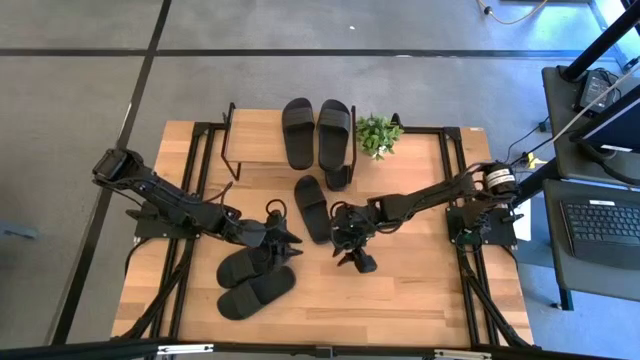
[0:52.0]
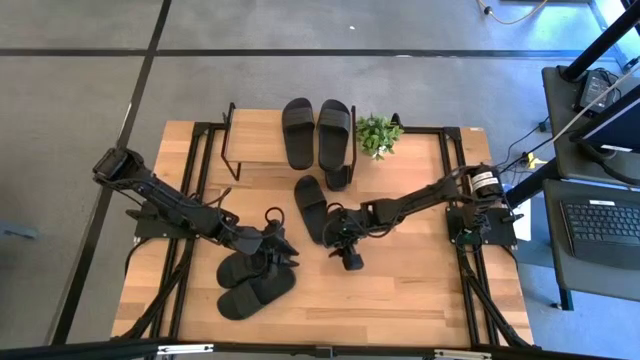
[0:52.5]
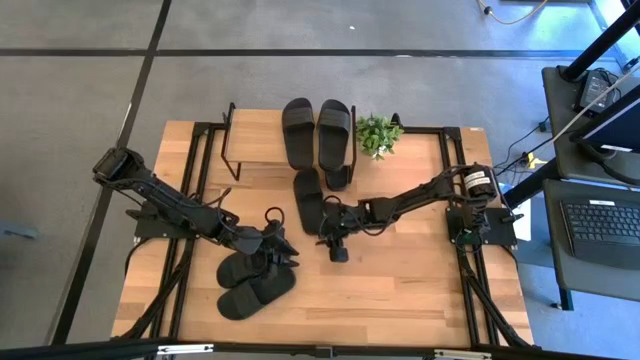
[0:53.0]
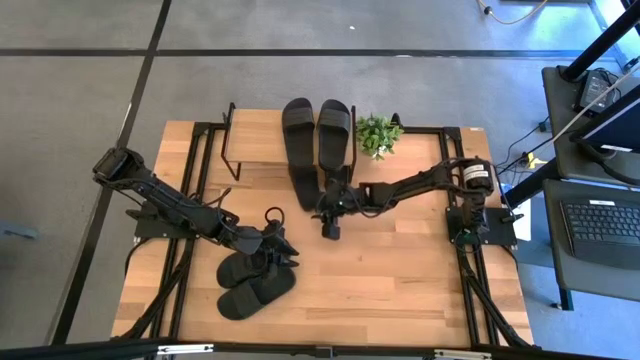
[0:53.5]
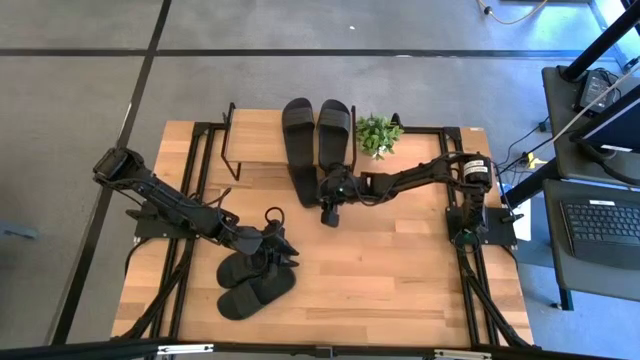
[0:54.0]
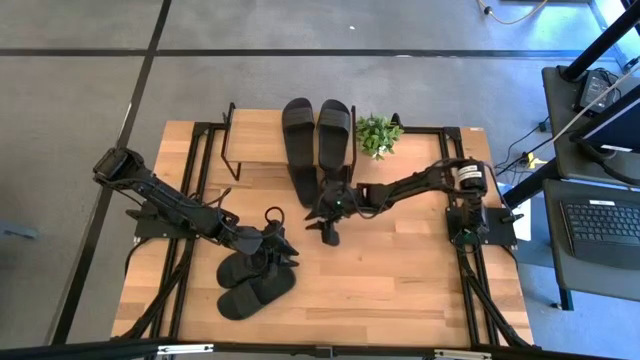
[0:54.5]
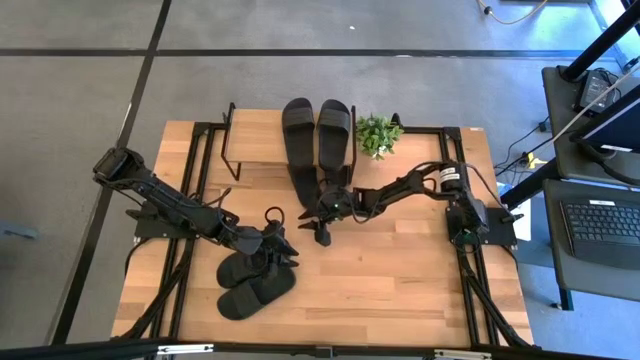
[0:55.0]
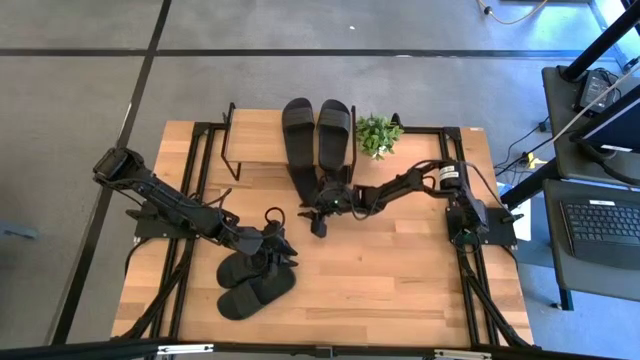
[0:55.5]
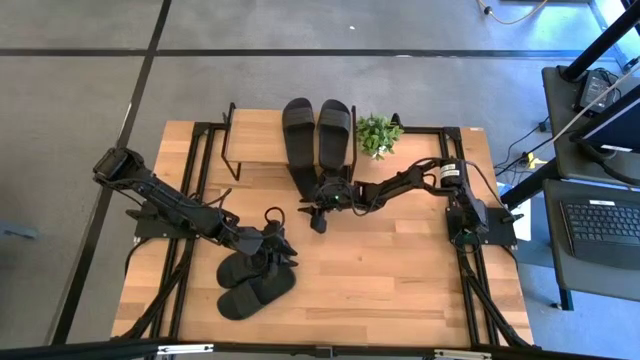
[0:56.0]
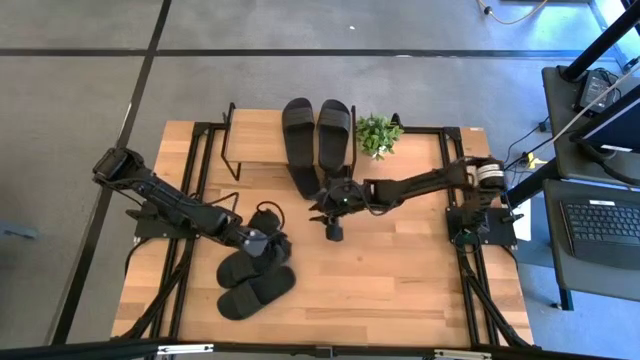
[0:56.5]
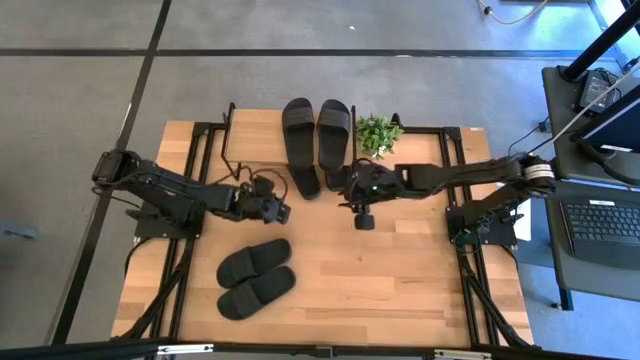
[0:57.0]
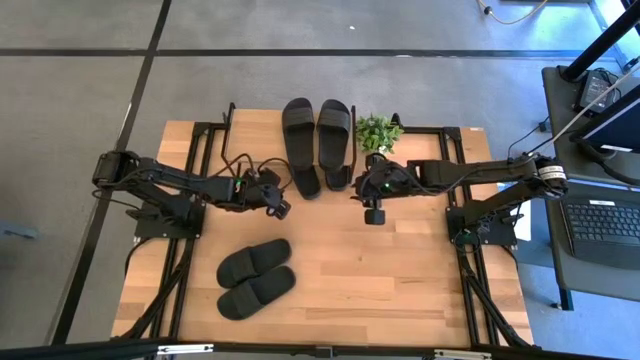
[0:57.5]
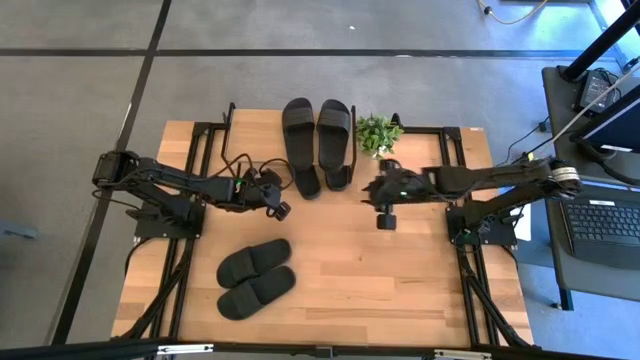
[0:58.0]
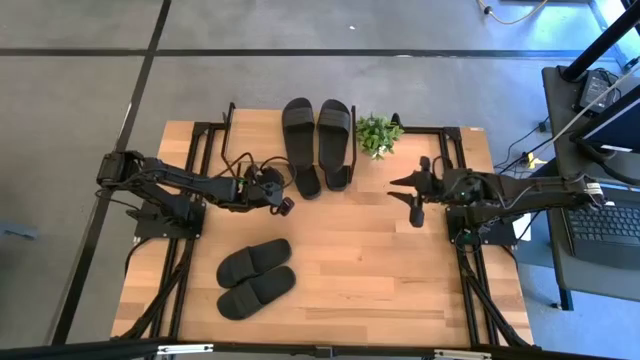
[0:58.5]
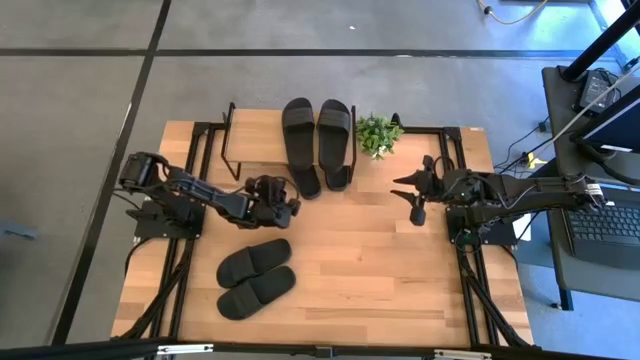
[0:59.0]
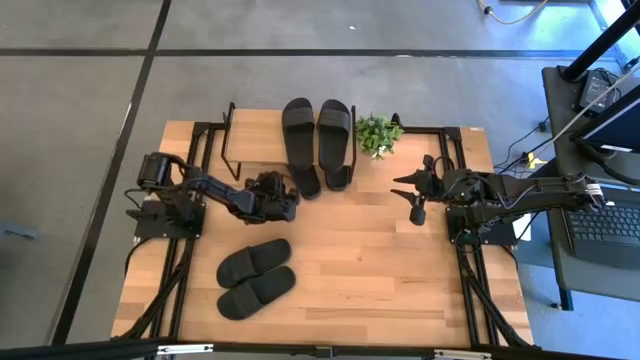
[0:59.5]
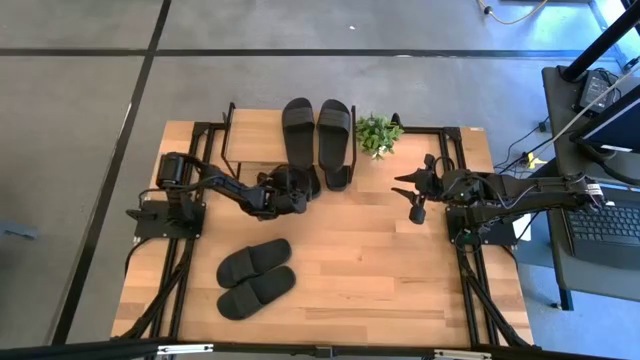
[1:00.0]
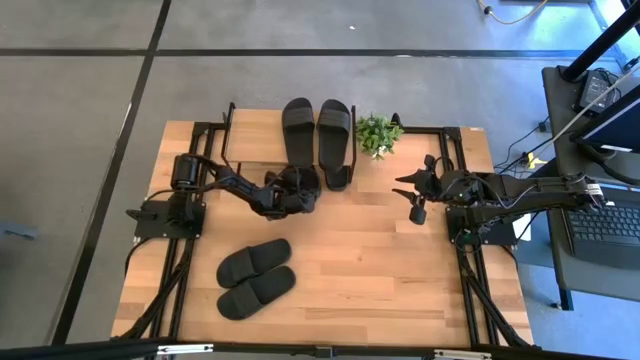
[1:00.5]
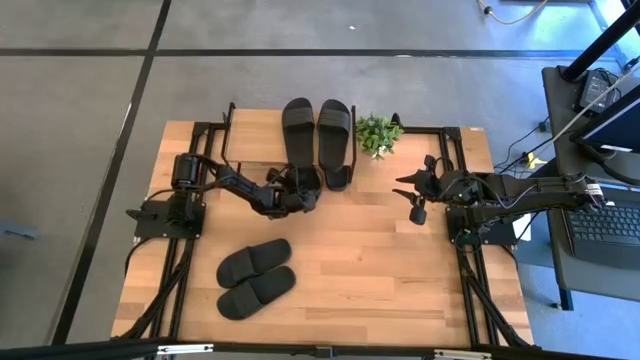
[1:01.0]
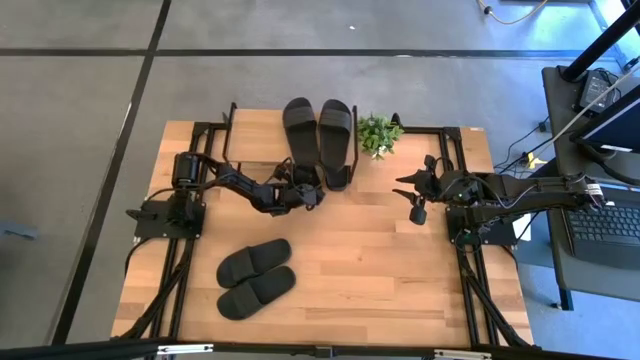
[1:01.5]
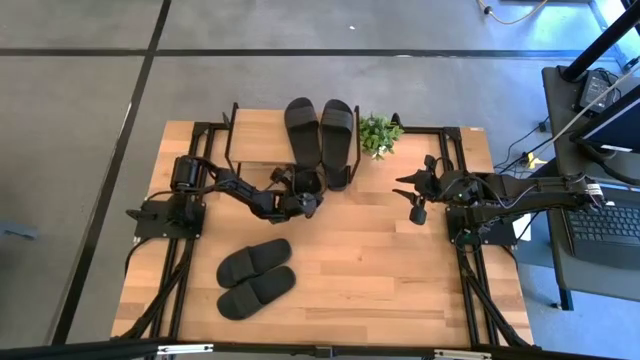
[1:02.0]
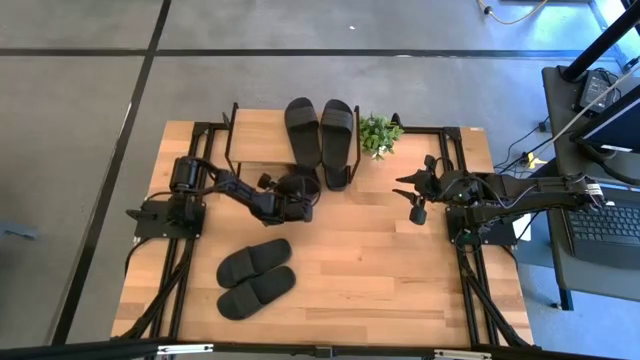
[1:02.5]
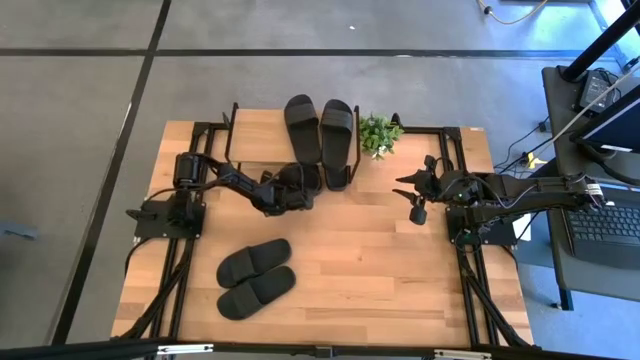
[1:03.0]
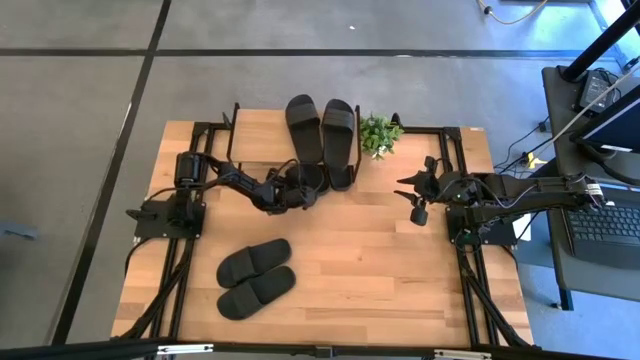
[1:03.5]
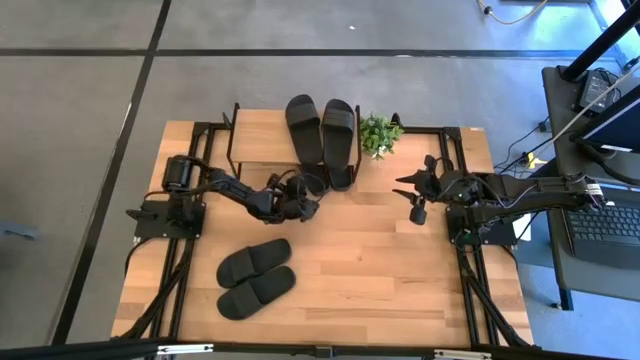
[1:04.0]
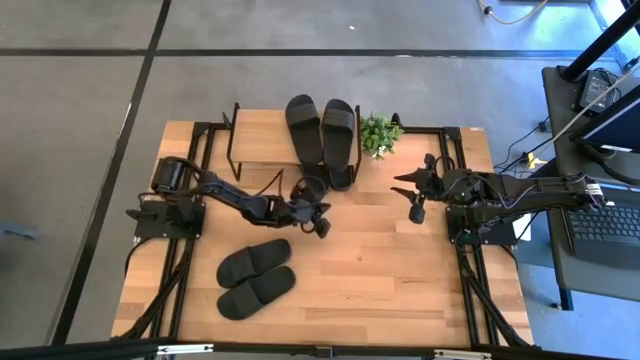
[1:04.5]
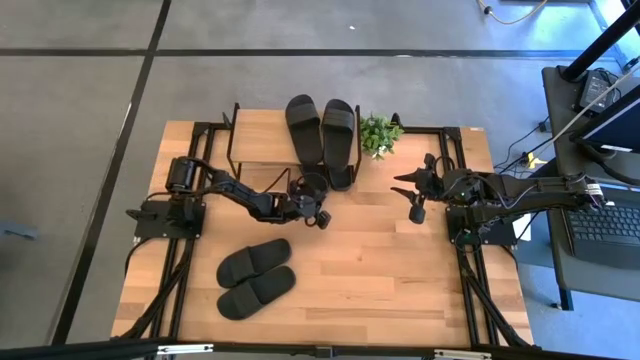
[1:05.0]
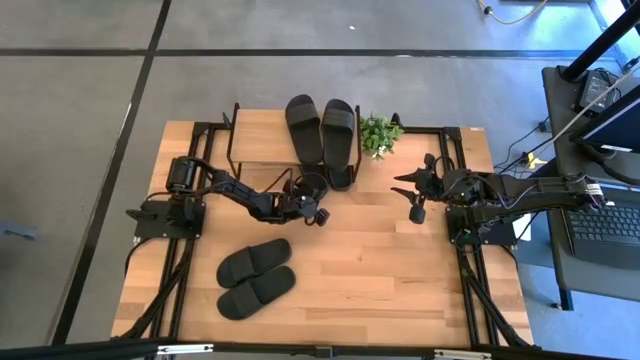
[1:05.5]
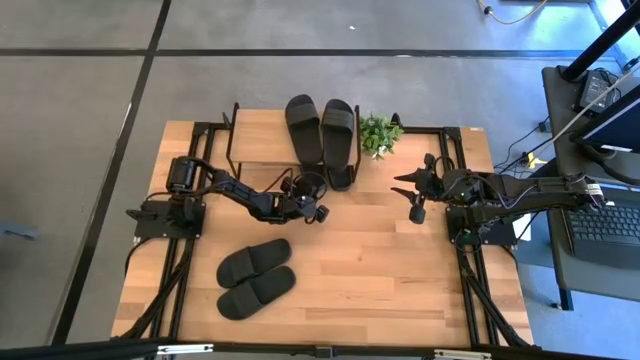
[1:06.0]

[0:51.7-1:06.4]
Task: Pick and place slides into the shelf
Put the black slide under the shelf

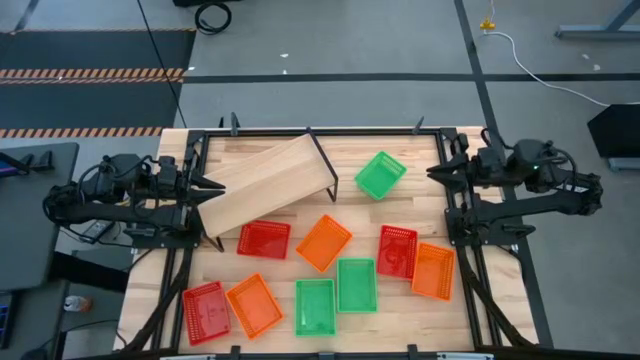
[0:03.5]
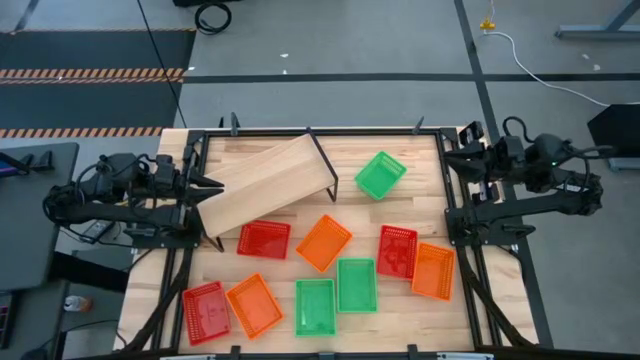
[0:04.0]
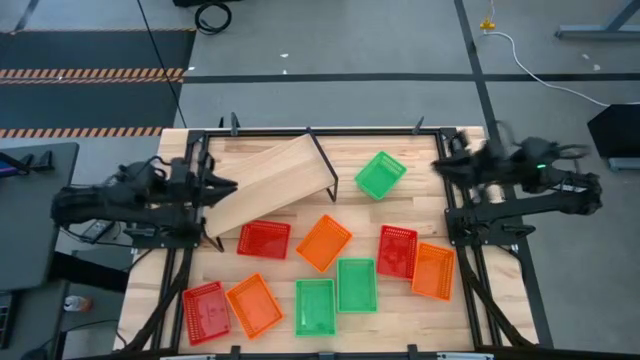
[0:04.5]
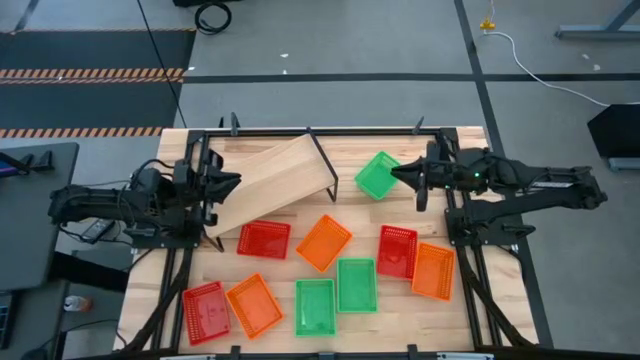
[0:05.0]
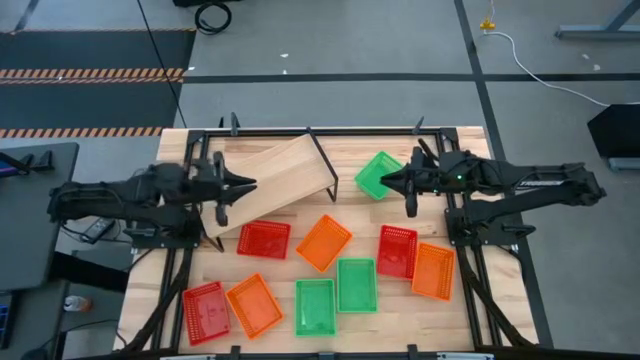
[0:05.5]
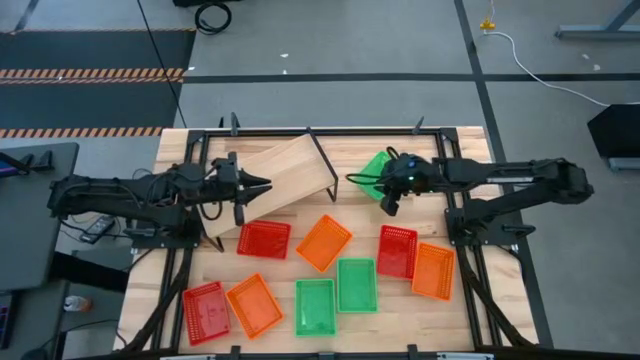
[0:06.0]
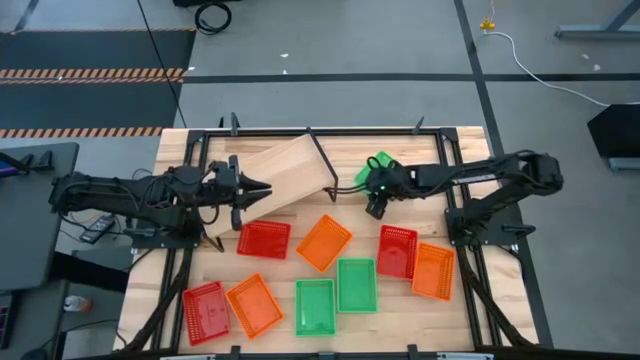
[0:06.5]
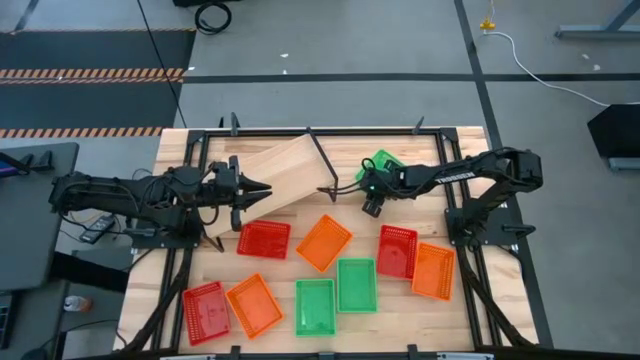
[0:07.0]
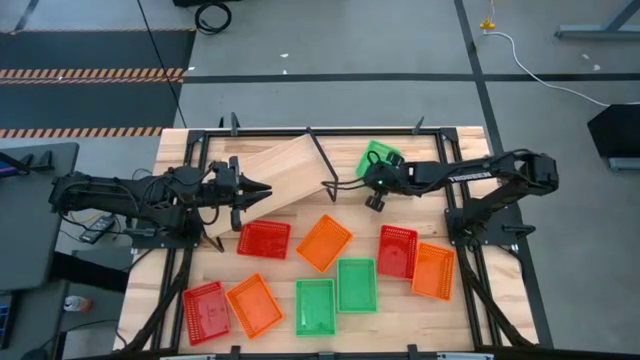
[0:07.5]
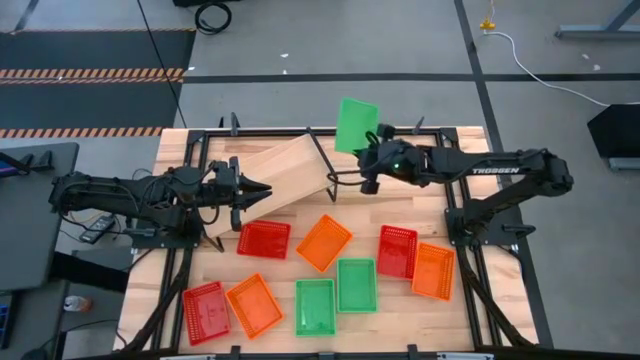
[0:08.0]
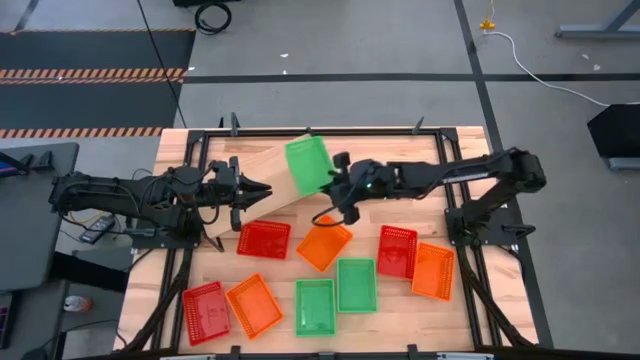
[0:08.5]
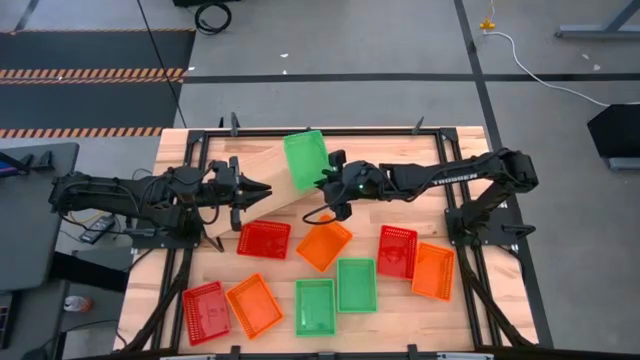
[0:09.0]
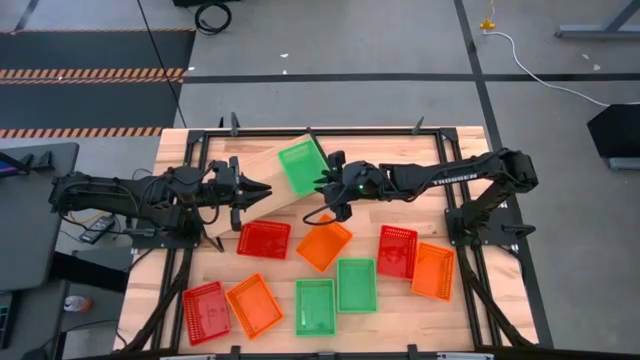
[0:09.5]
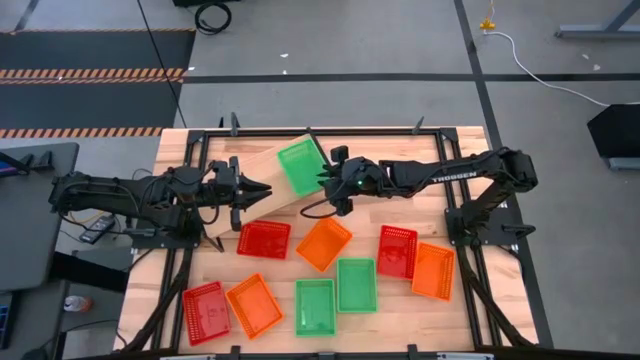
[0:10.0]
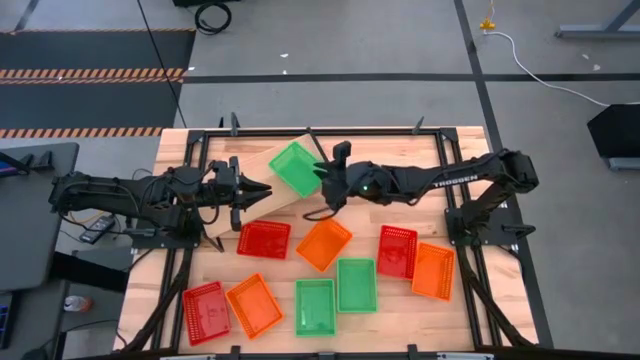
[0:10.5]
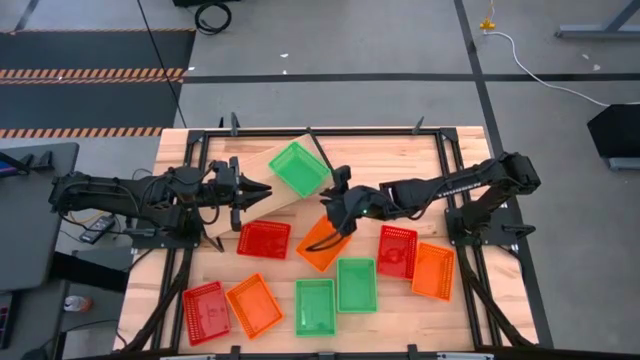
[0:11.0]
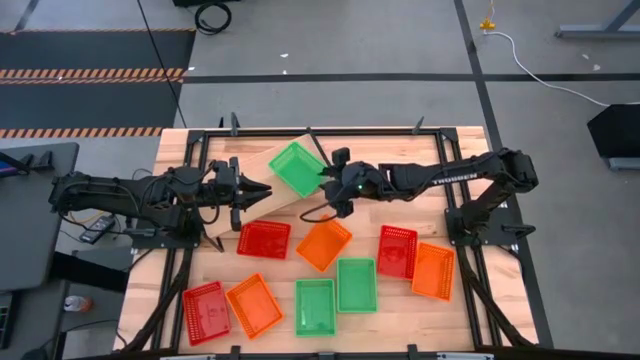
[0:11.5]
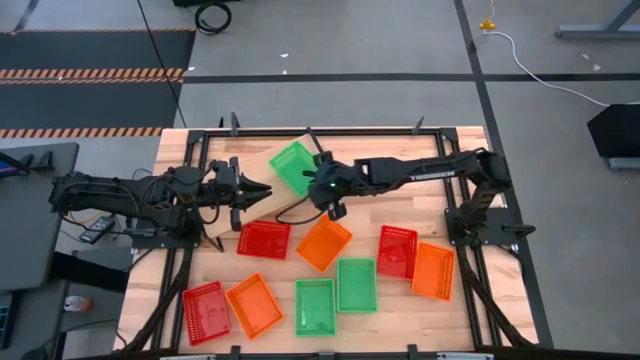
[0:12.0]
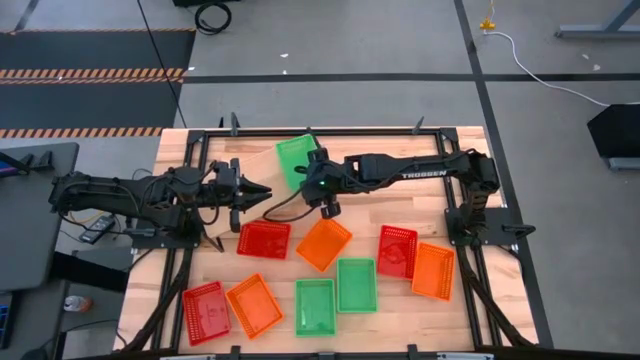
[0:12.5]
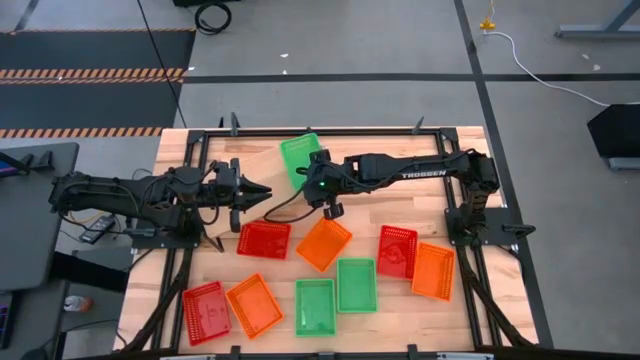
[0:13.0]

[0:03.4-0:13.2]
Task: Stack baskets on shelf by color
Put the top green bin on the shelf
